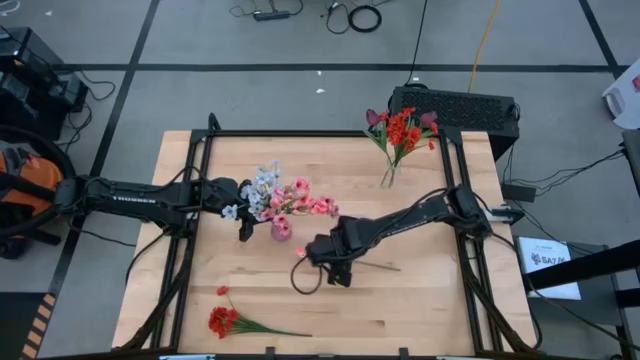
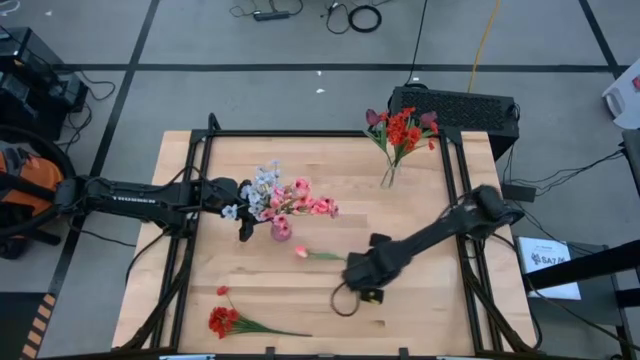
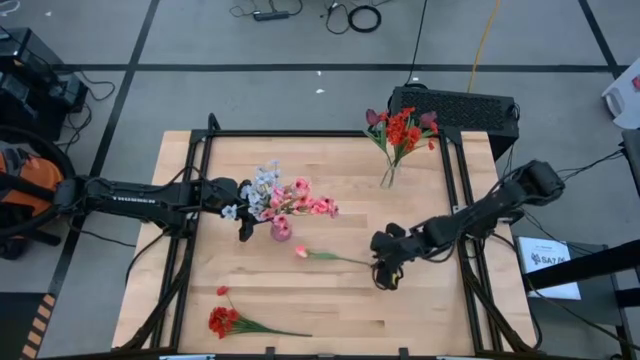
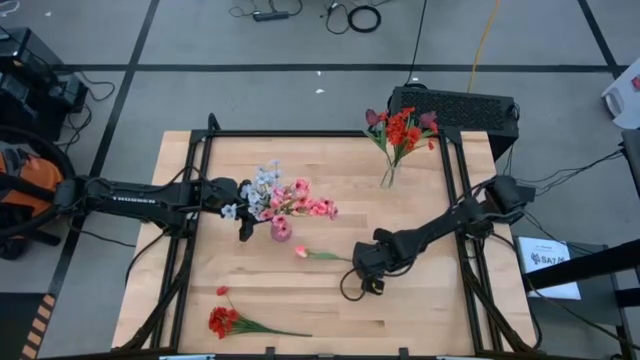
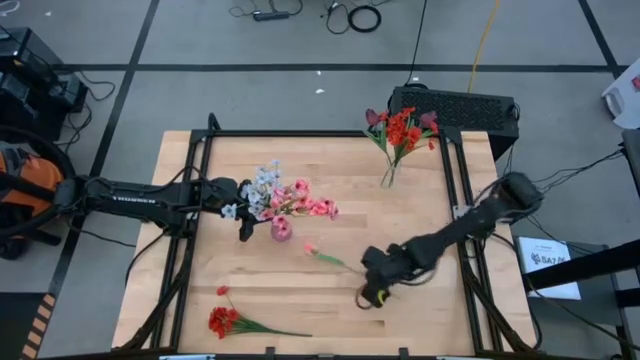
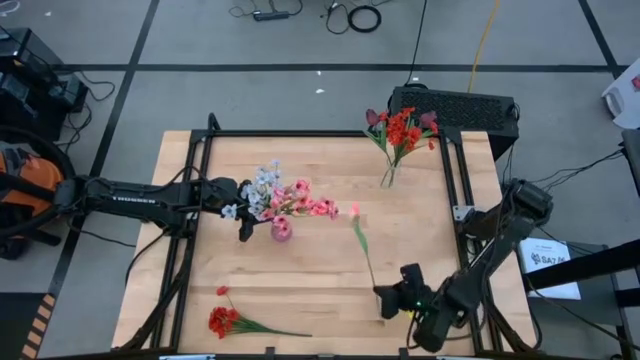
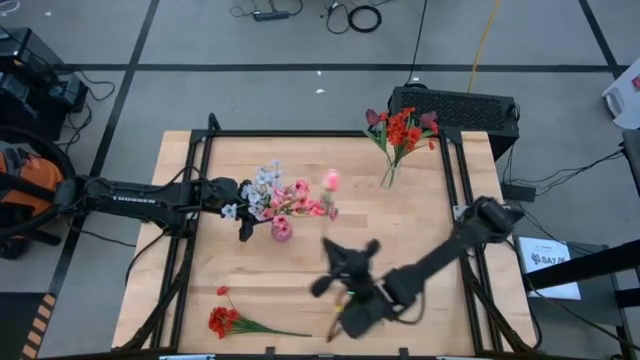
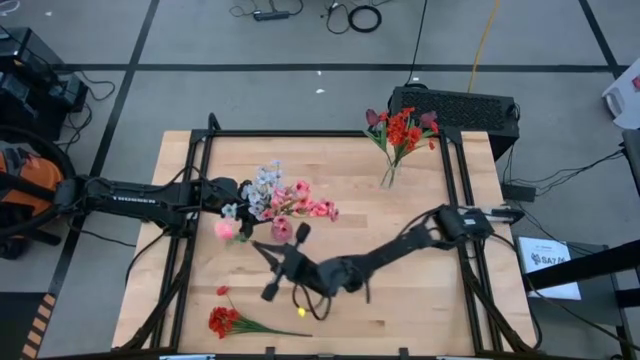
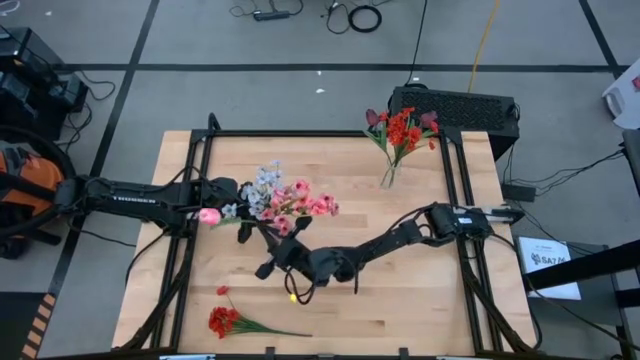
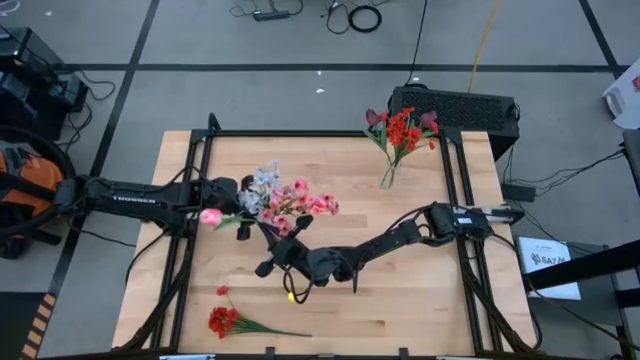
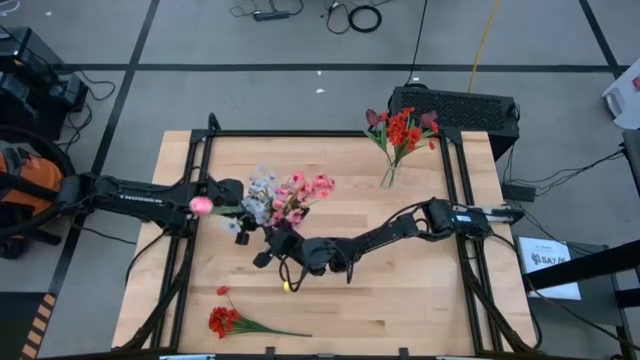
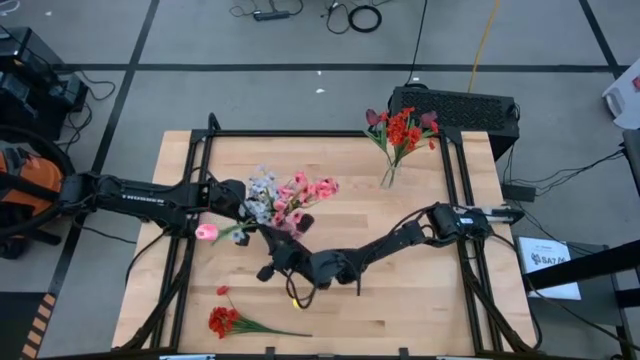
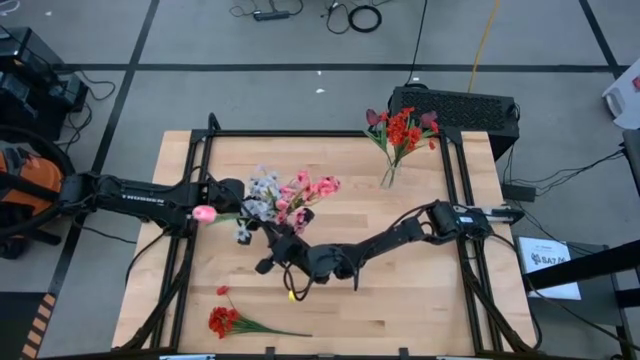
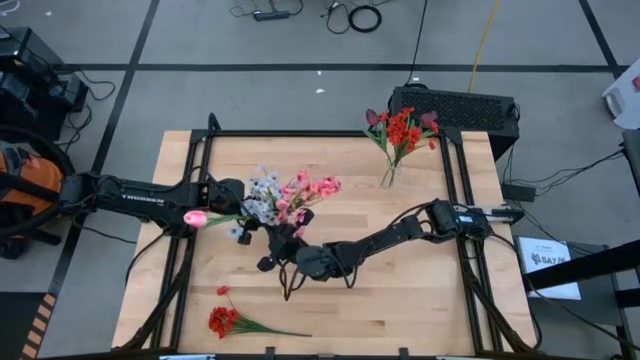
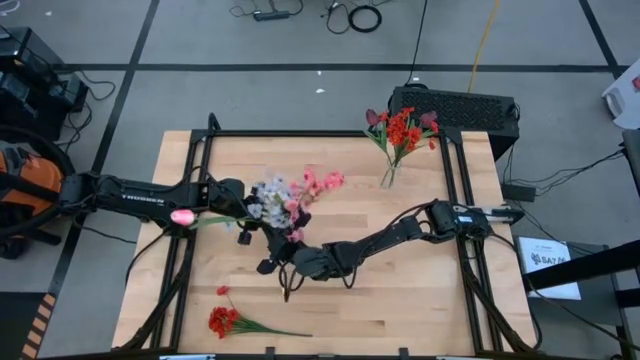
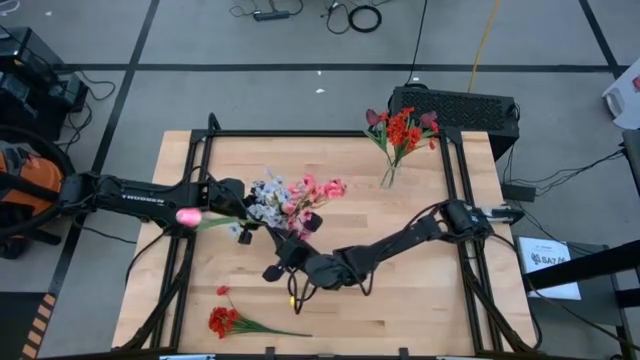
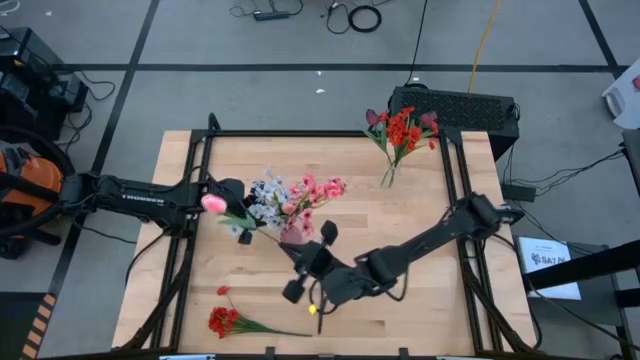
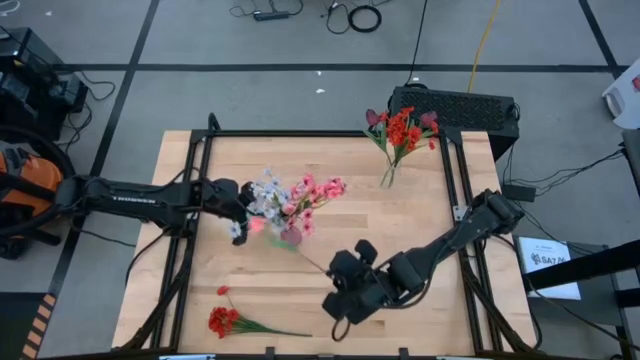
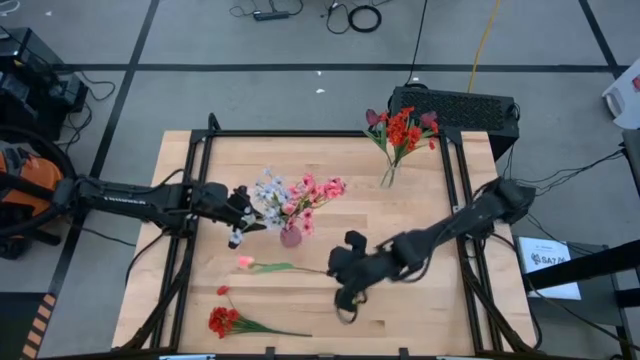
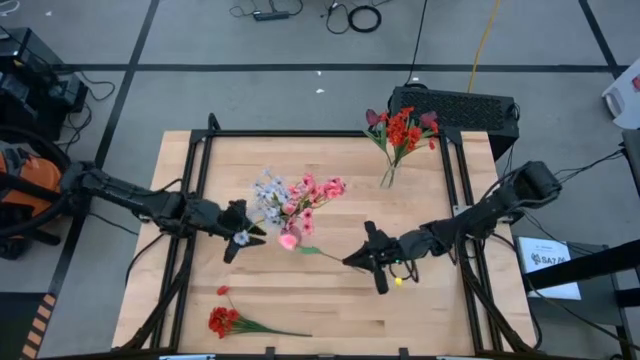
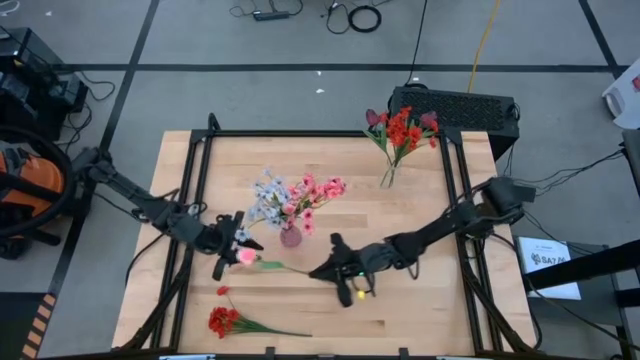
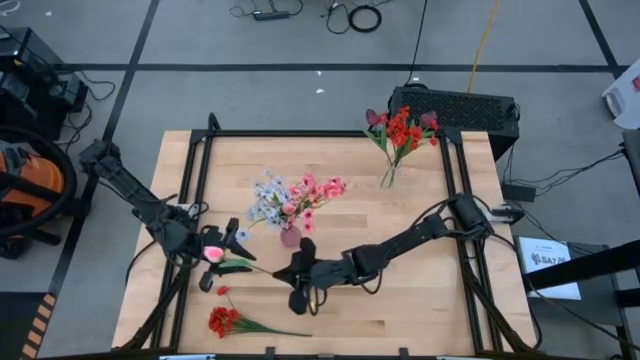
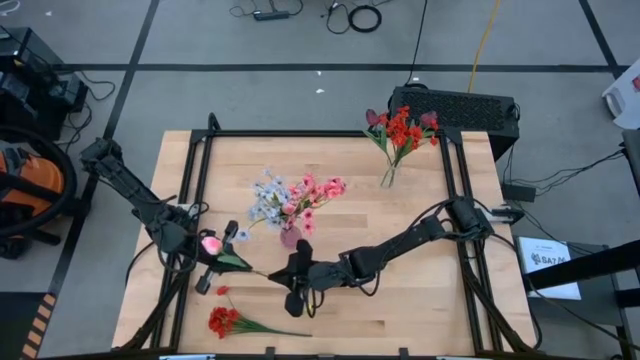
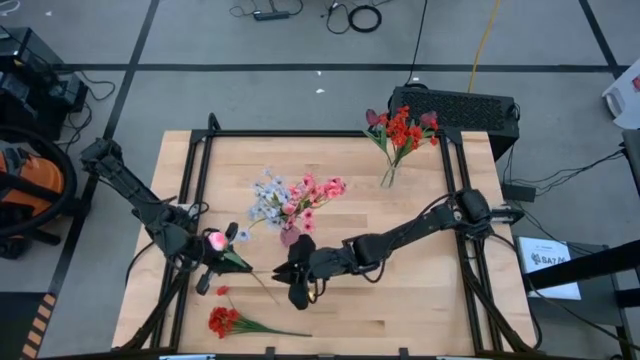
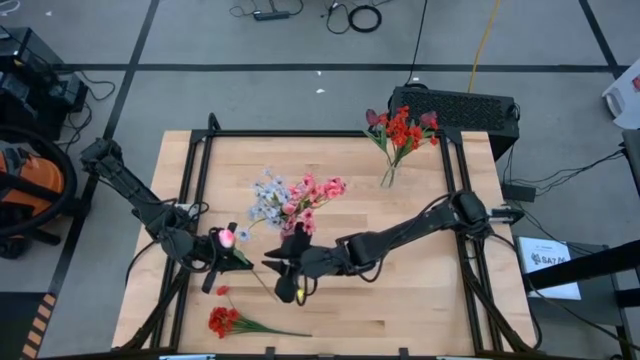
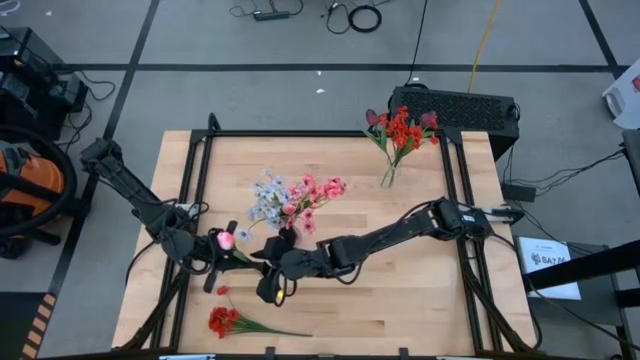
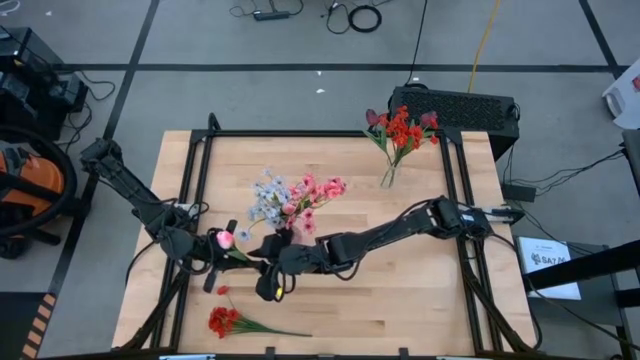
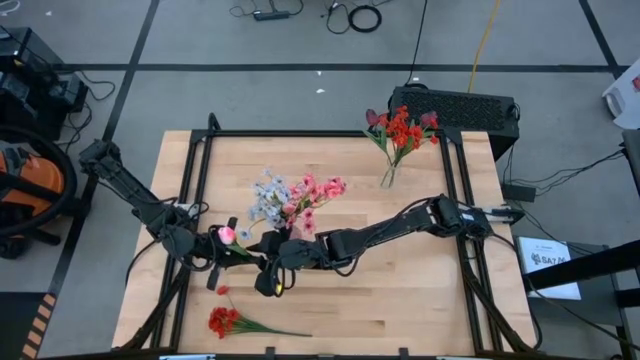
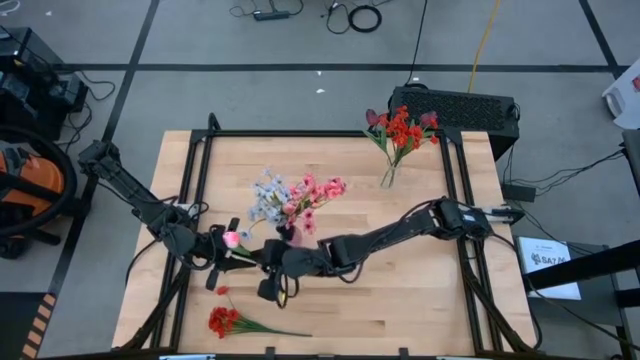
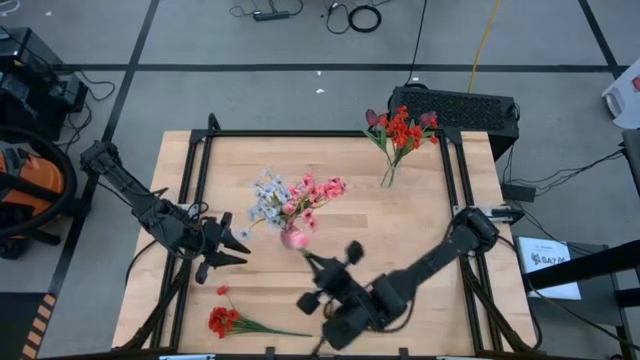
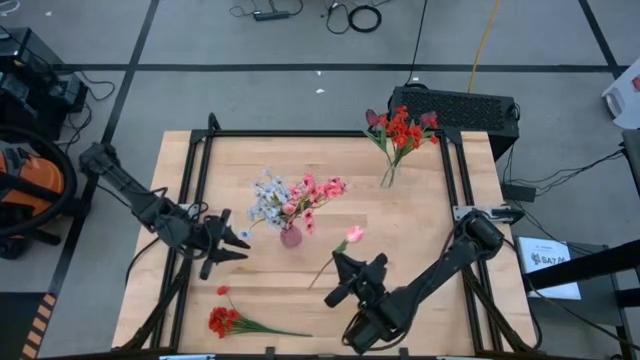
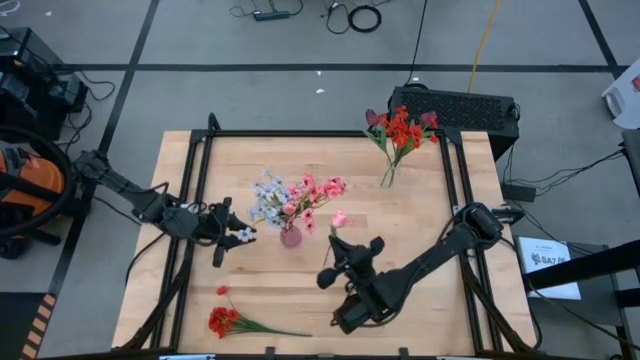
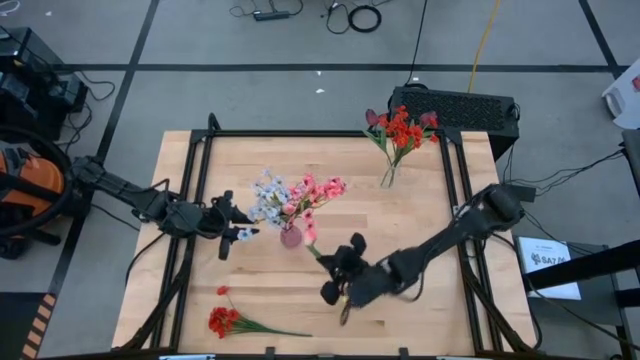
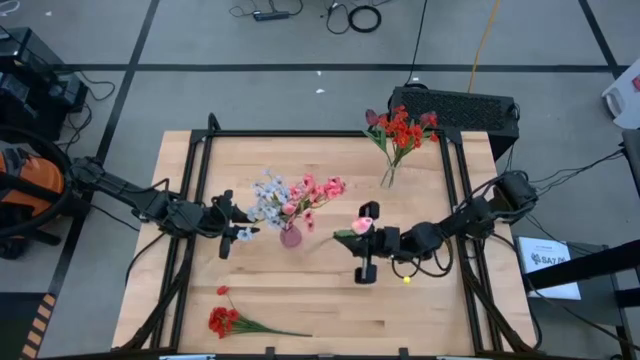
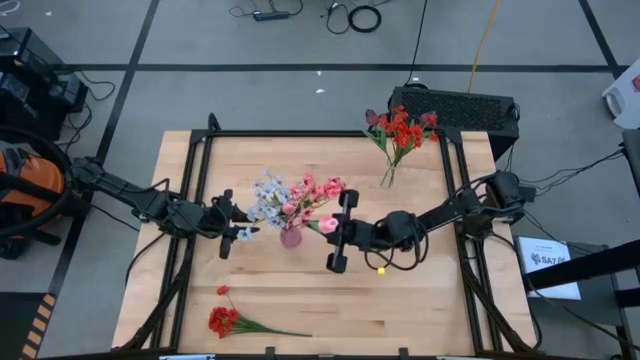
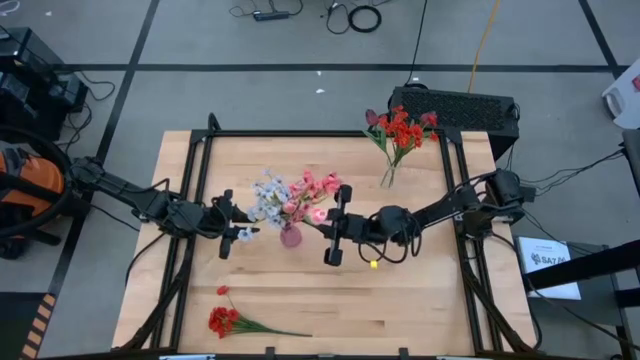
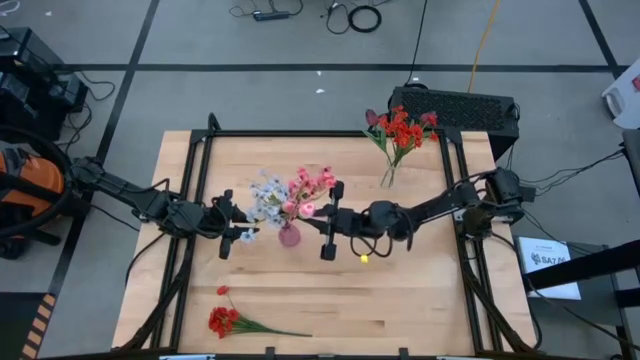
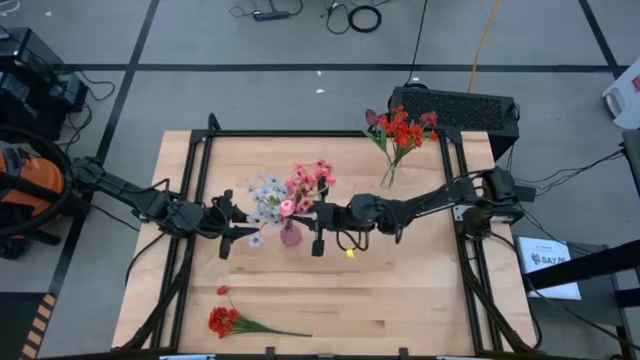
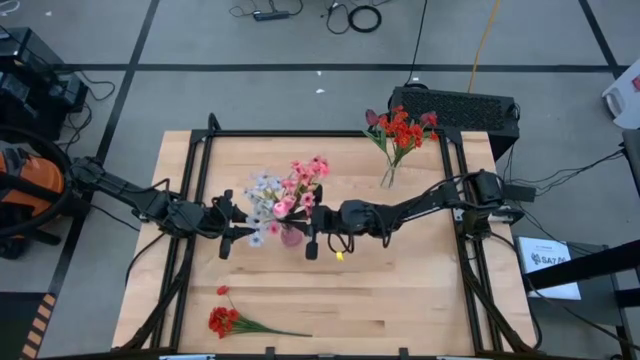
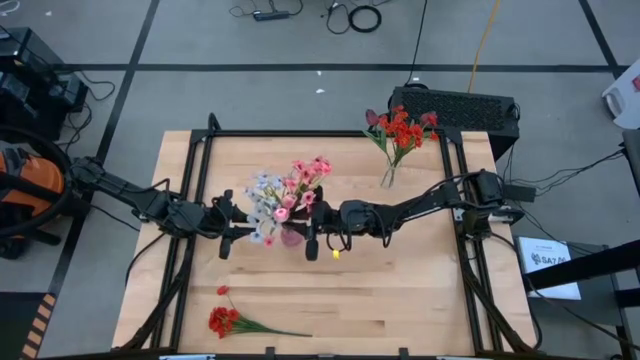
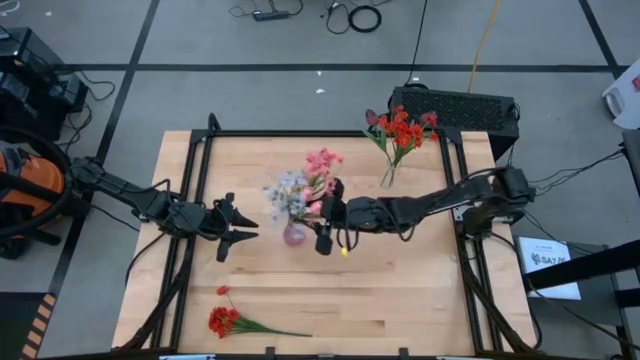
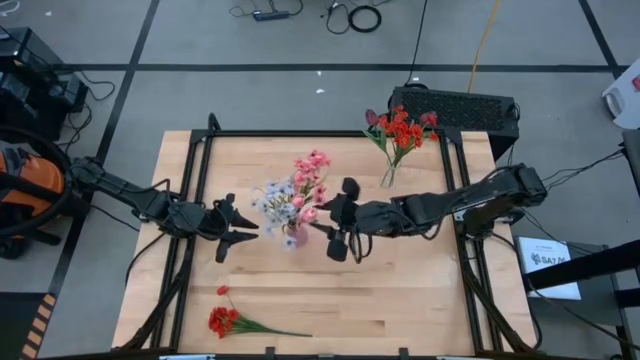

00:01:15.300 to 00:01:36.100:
Task: Sort flowers into vase by color
Put the pink flower into the purple vase
